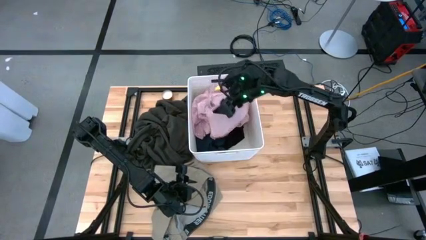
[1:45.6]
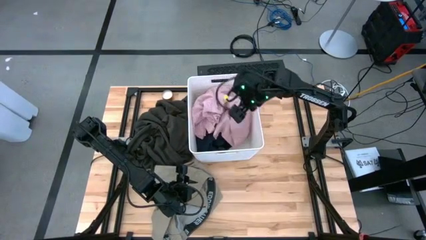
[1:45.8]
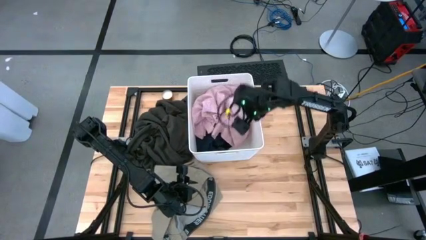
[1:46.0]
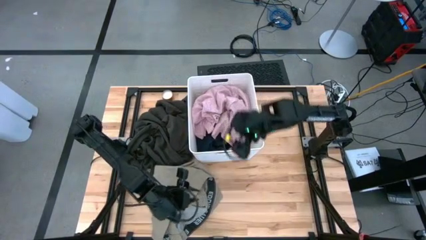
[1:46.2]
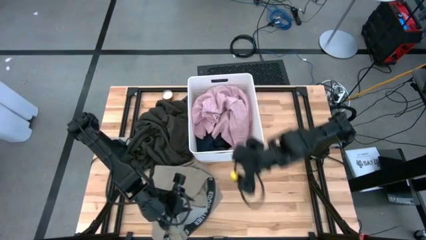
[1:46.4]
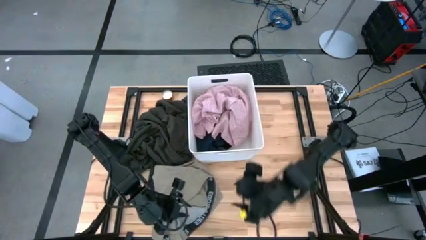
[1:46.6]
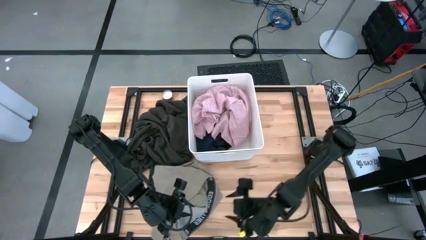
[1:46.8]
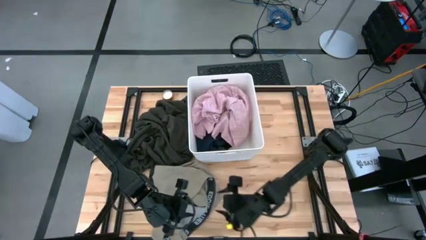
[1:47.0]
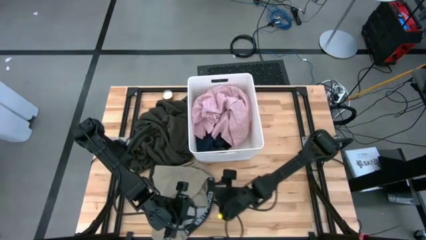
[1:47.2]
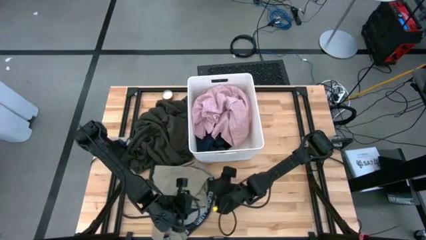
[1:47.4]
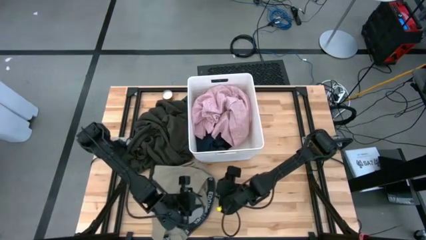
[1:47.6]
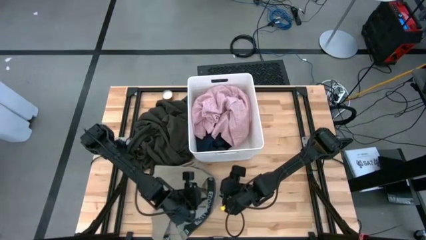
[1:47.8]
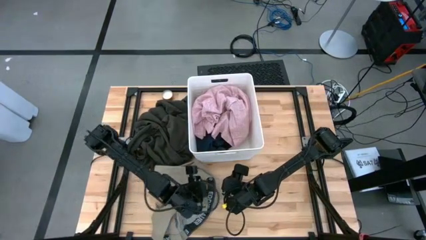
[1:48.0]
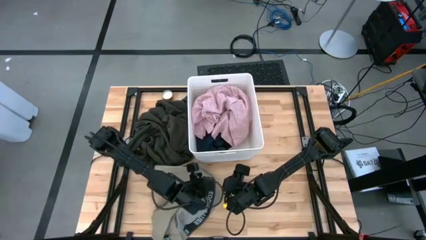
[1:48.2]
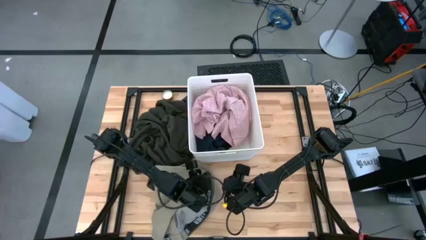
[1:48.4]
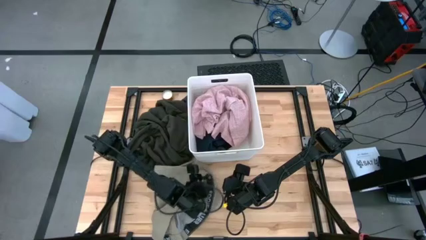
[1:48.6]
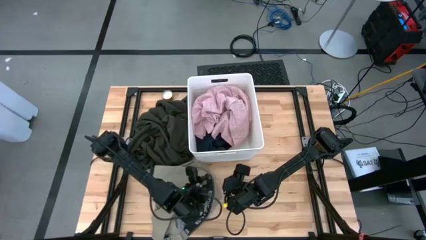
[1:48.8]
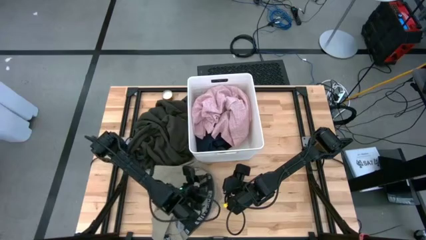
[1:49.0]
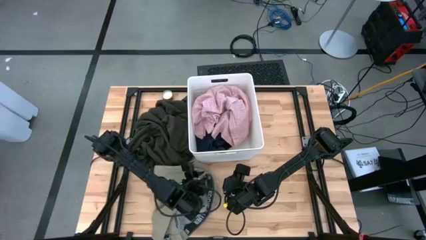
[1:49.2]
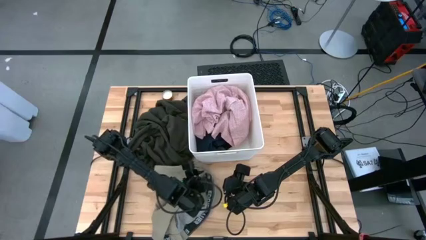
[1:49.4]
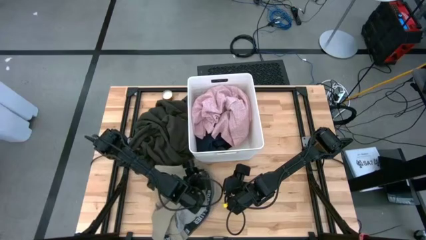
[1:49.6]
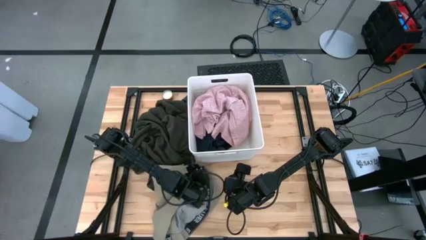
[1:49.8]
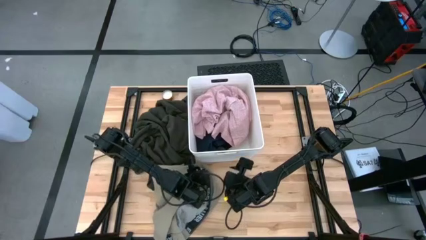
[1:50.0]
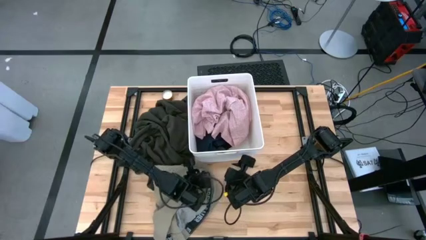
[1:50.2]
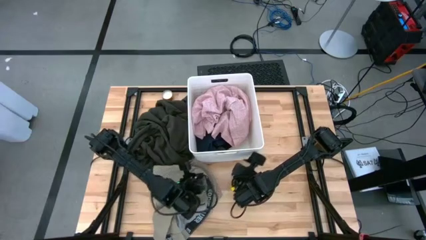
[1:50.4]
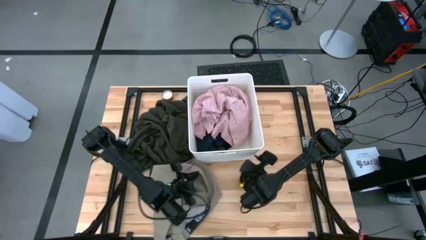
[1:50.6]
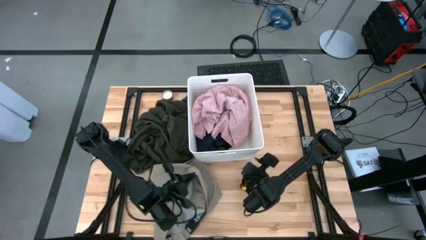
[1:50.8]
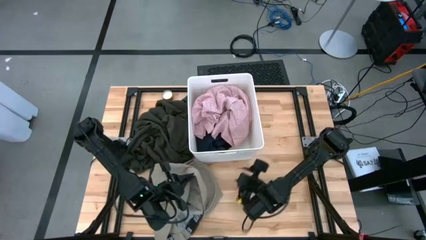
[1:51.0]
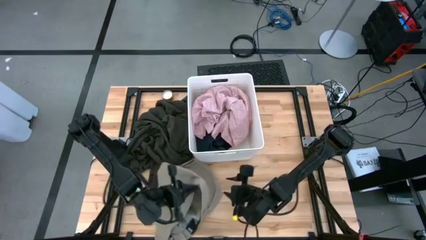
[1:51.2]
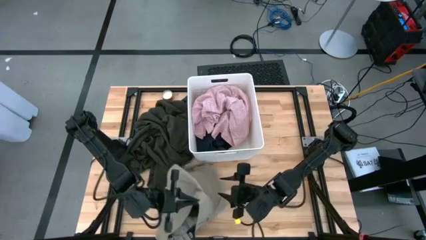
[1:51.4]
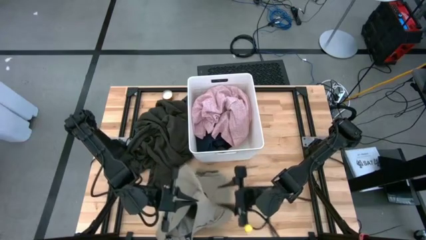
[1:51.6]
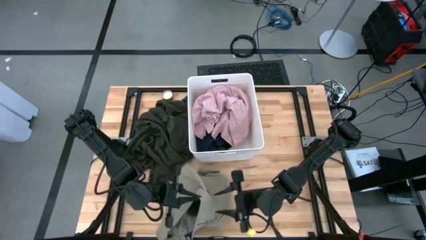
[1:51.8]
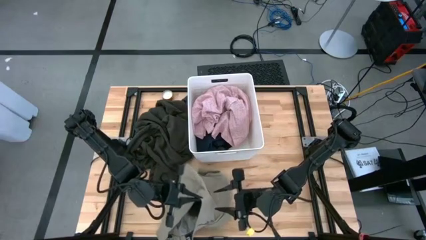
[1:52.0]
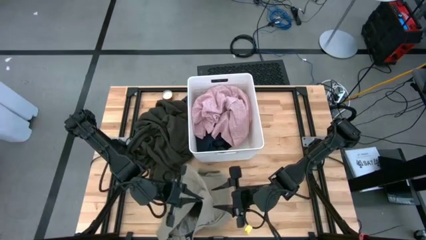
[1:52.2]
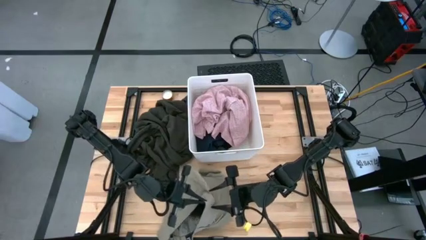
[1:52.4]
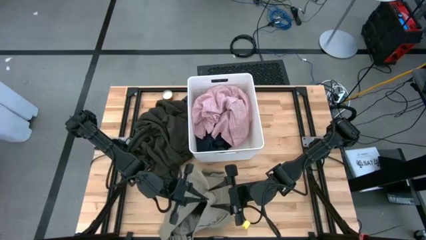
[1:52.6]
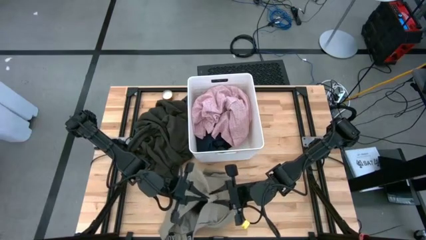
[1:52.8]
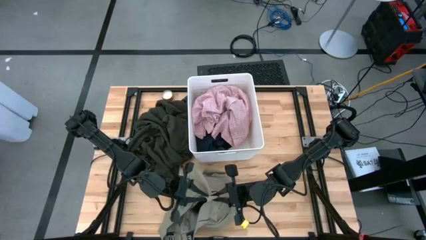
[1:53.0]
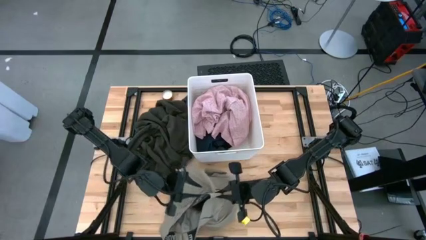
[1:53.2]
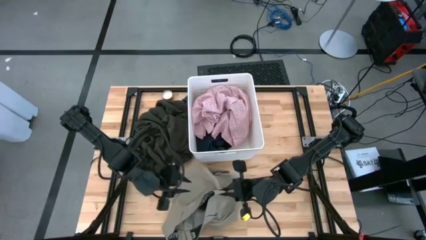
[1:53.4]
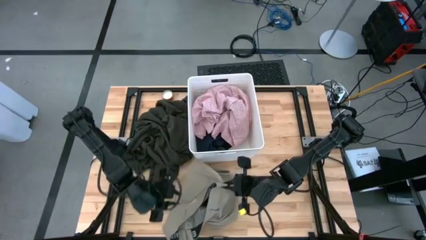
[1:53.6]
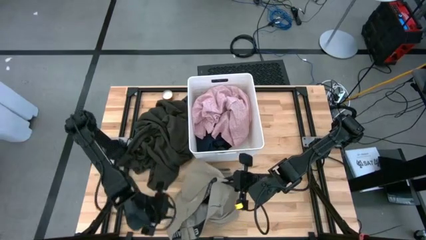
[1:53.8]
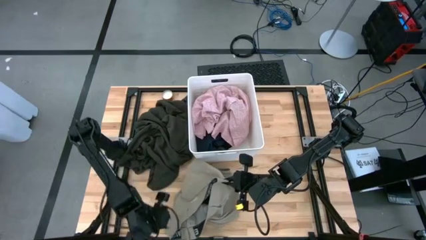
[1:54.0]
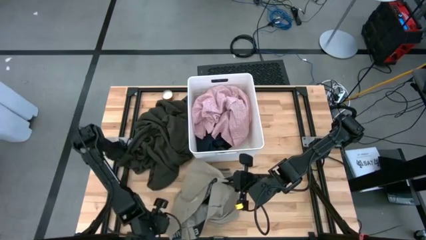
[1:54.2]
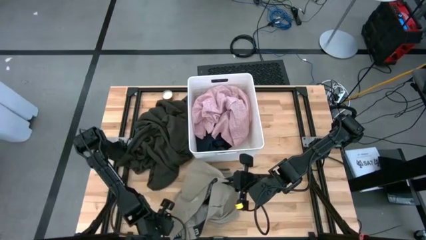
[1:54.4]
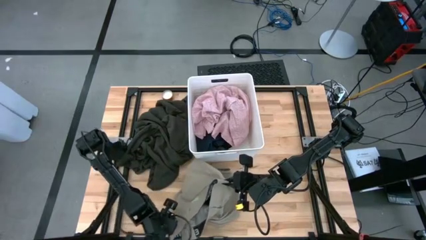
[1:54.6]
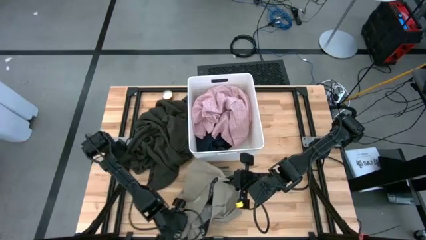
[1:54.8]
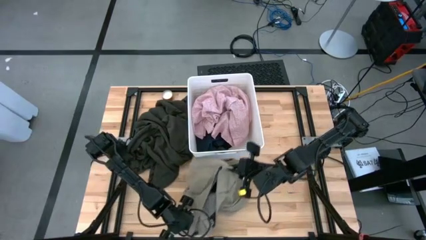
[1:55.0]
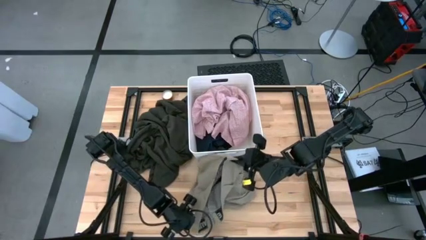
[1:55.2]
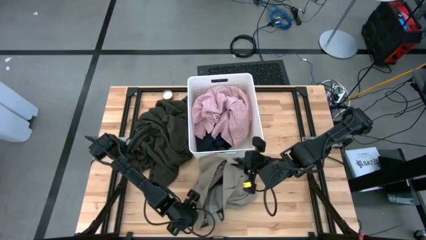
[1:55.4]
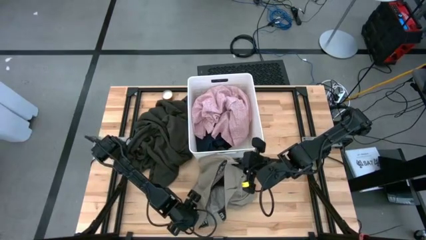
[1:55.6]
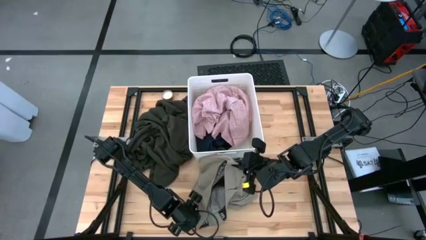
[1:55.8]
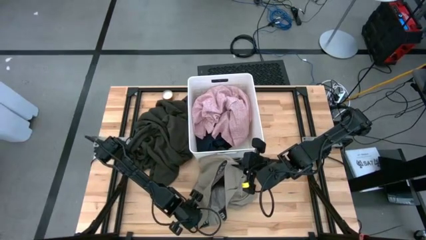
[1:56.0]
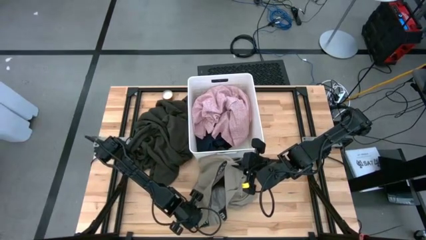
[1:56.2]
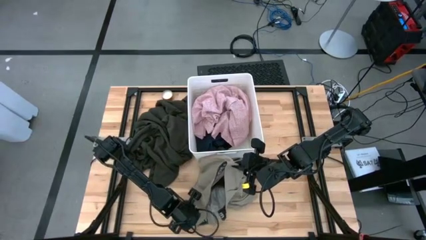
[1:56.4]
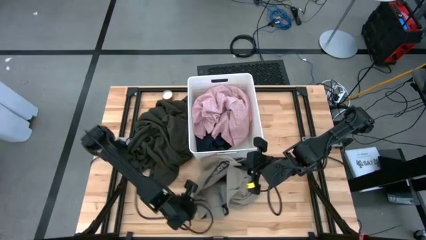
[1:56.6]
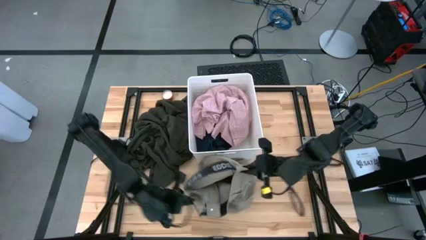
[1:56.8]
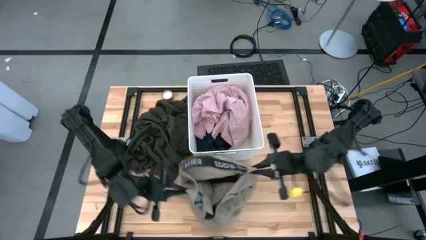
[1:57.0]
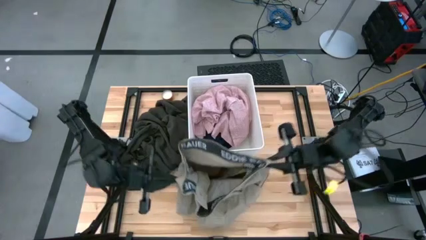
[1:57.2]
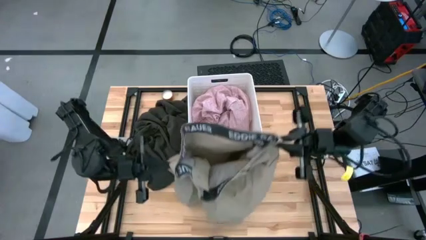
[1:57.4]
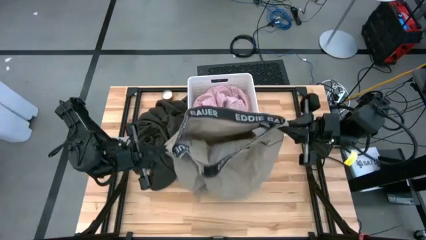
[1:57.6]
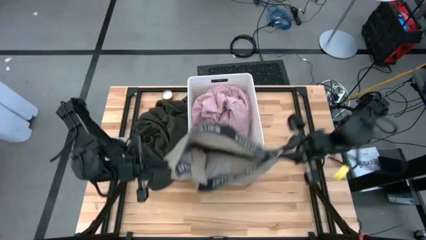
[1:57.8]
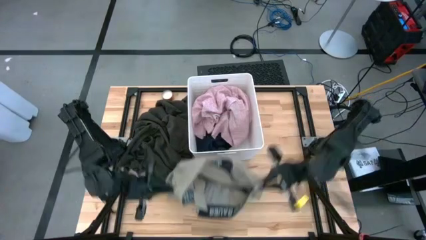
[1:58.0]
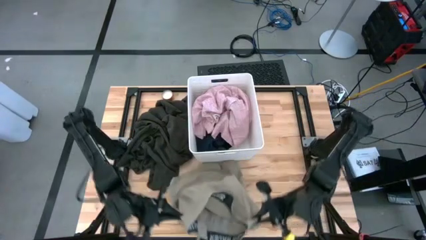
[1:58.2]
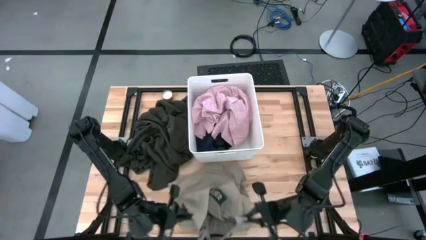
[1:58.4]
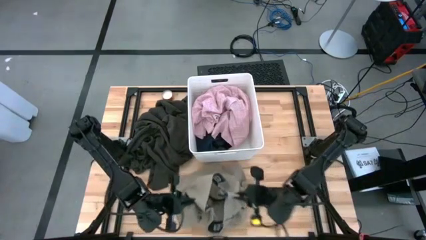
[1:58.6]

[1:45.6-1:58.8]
Task: Sort clothes
Put the light brown shorts into the laundry bin

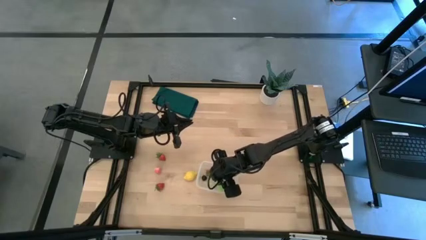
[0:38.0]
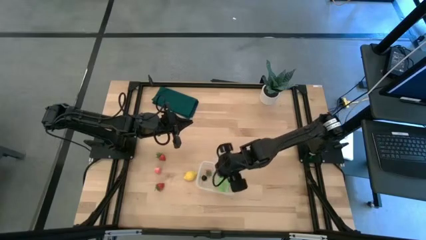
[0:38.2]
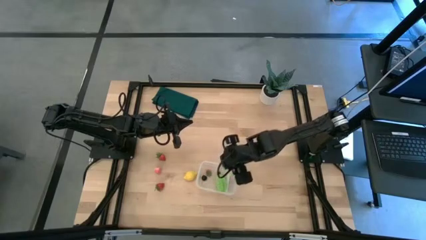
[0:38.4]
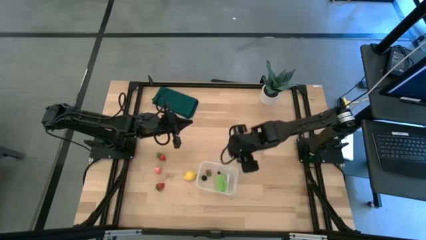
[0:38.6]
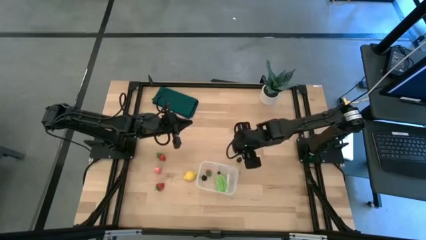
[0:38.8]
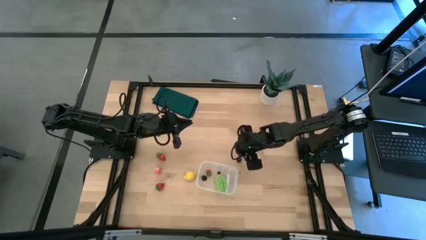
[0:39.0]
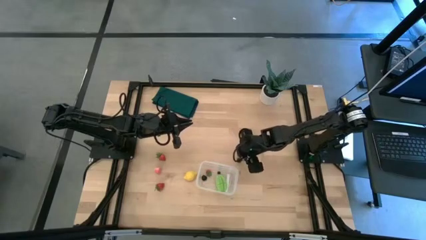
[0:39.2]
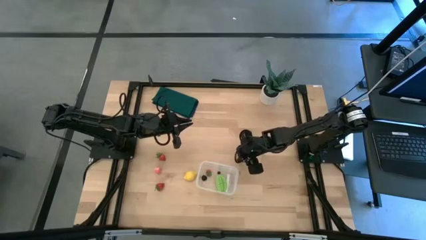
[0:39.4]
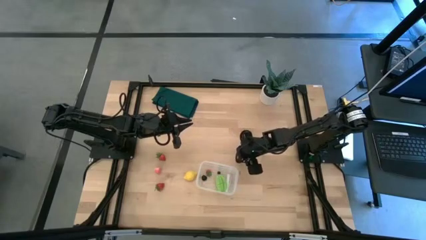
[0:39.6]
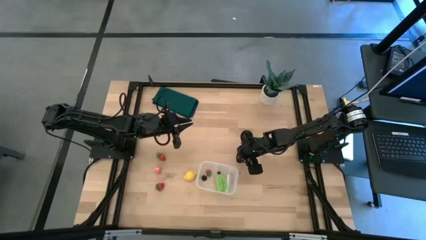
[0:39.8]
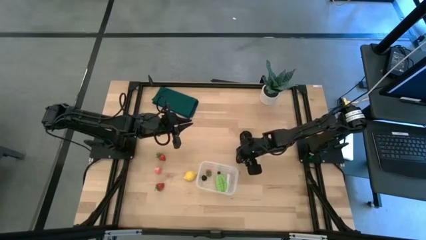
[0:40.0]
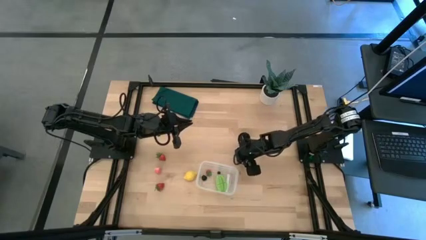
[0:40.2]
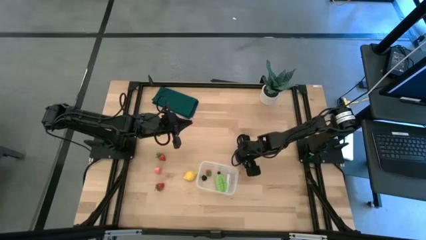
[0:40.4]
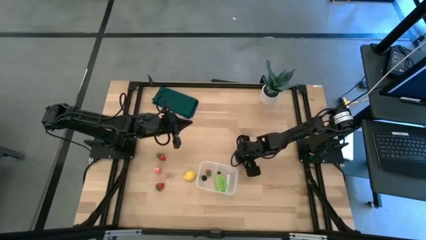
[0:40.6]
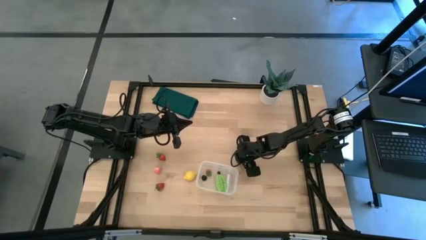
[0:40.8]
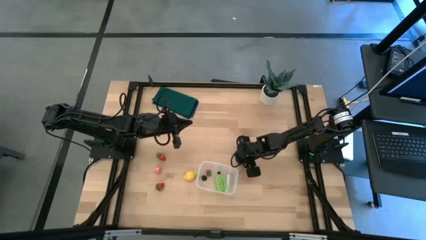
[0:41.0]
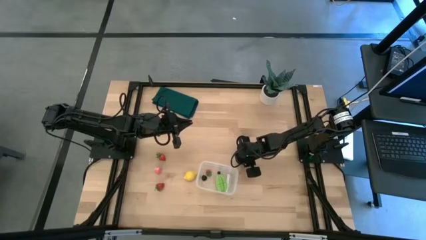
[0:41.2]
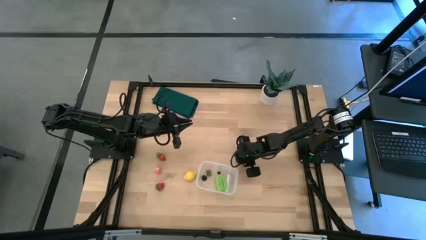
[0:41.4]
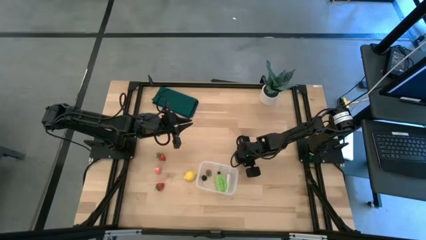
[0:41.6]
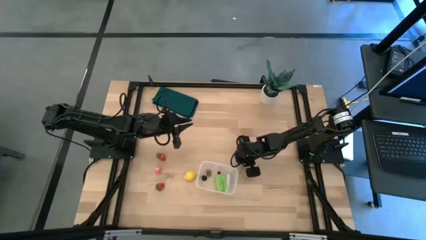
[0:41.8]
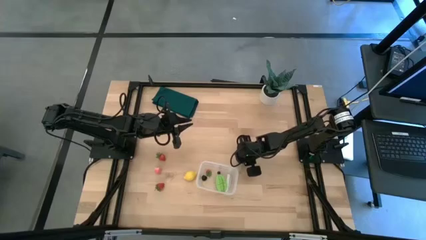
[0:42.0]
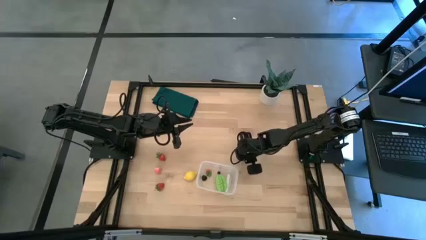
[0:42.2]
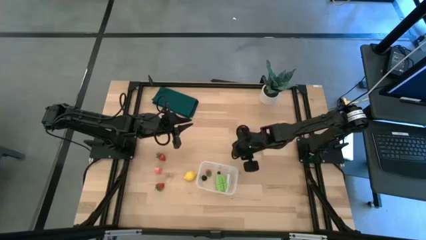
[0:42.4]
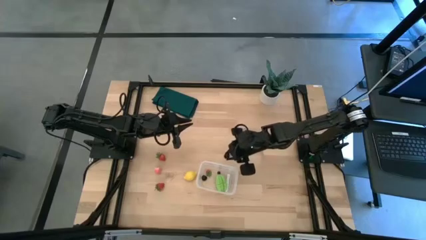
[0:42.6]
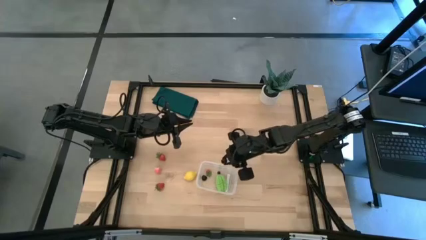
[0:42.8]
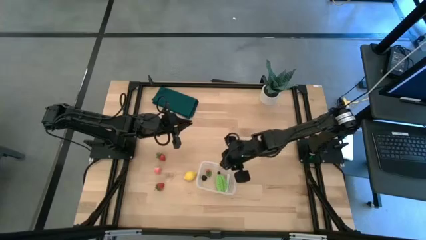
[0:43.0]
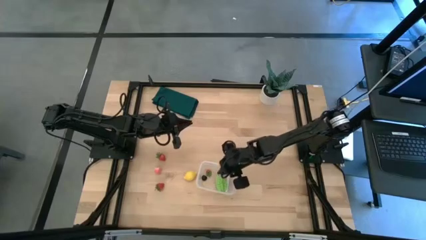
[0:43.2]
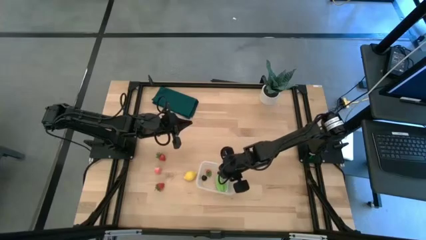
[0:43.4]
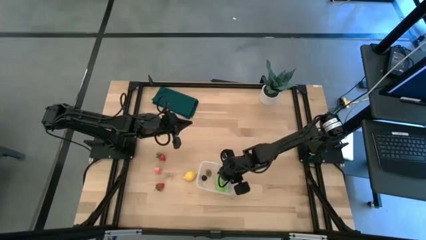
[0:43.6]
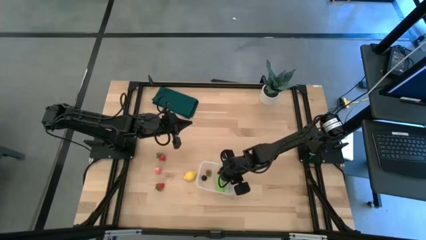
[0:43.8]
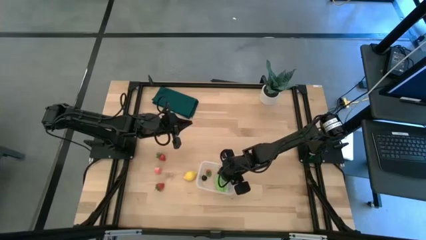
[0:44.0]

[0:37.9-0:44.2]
Task: Pick and placing Produce into tupperware
Put the blackberry into the transparent bin
